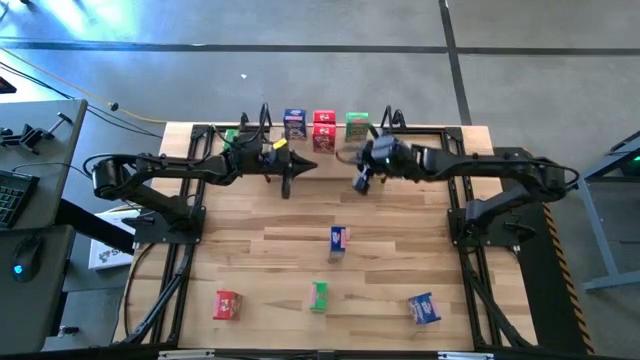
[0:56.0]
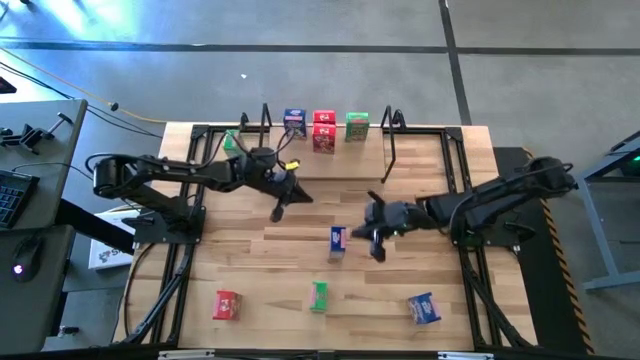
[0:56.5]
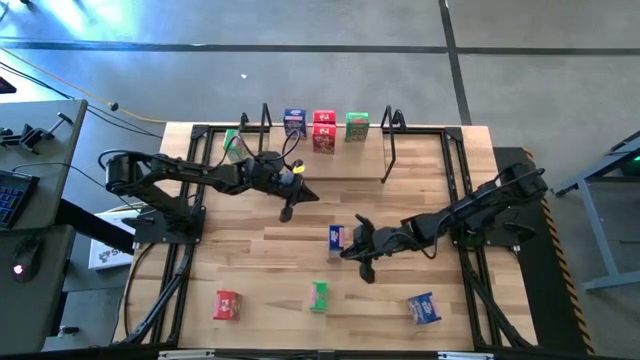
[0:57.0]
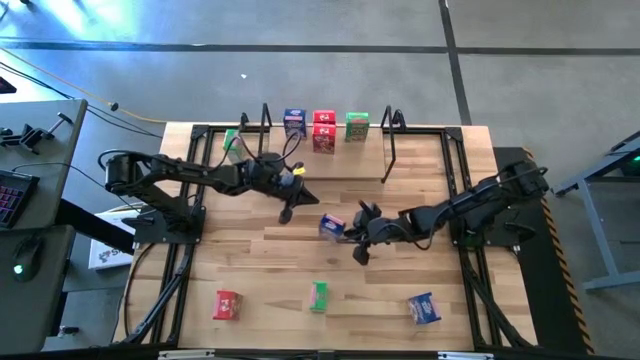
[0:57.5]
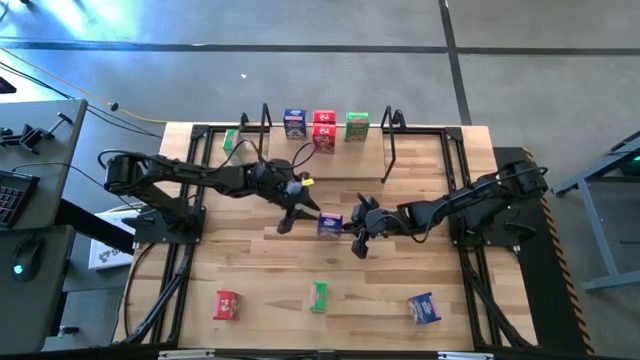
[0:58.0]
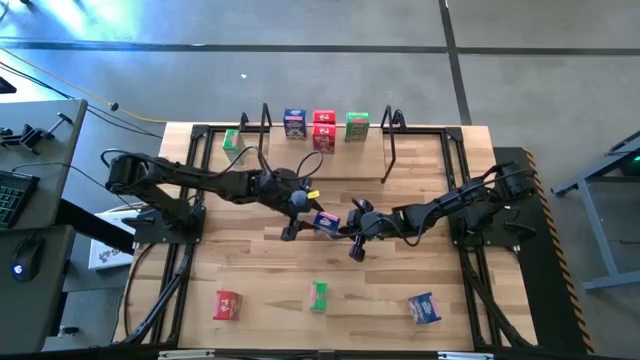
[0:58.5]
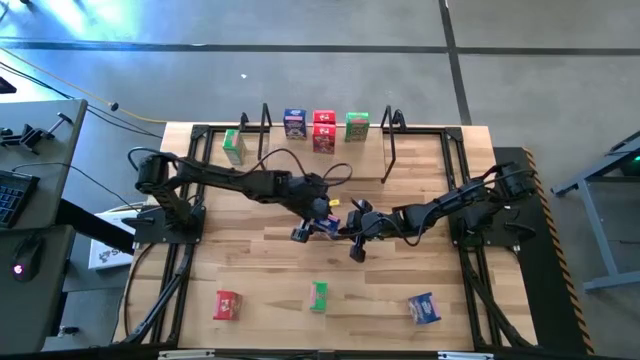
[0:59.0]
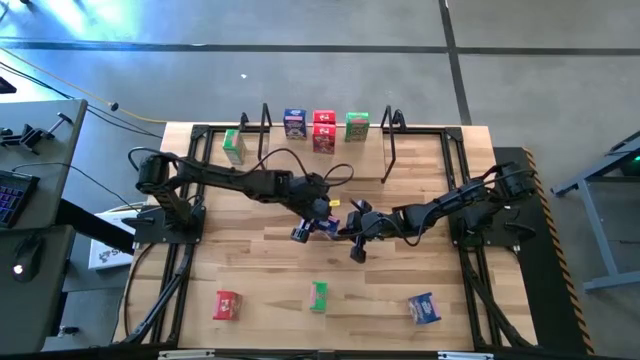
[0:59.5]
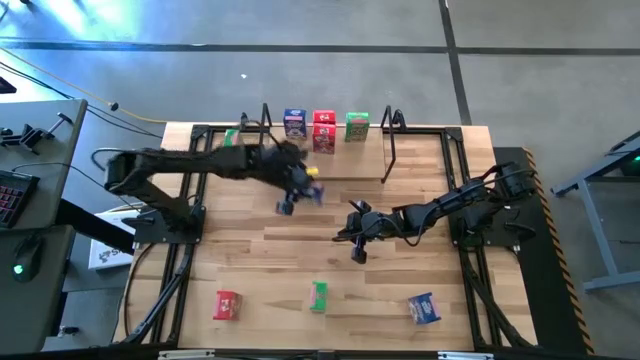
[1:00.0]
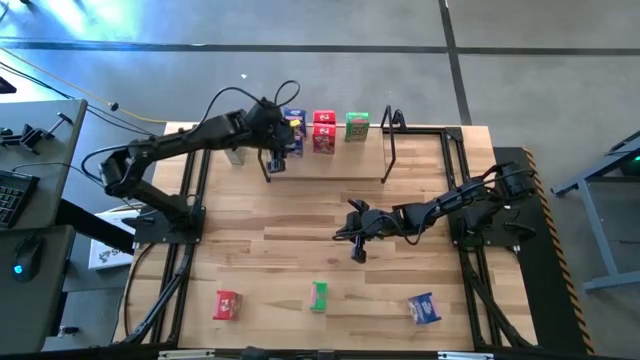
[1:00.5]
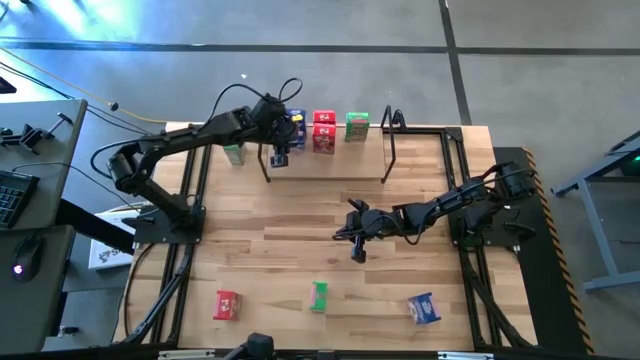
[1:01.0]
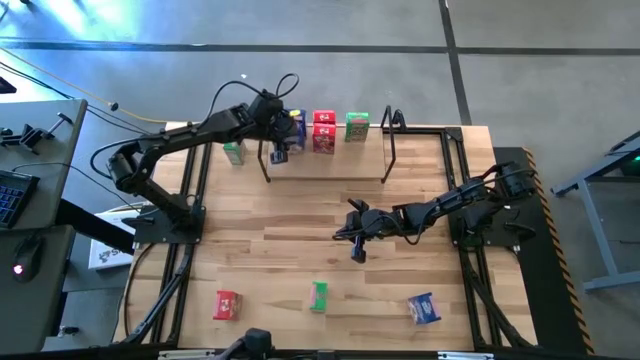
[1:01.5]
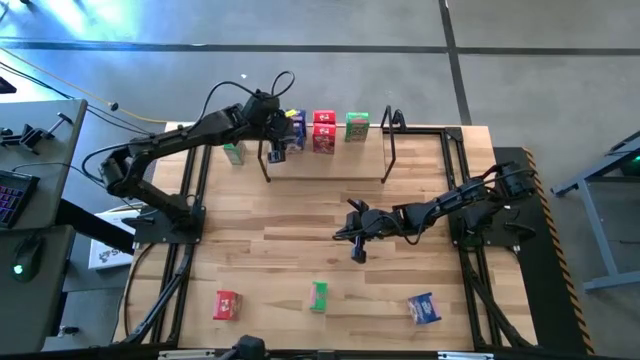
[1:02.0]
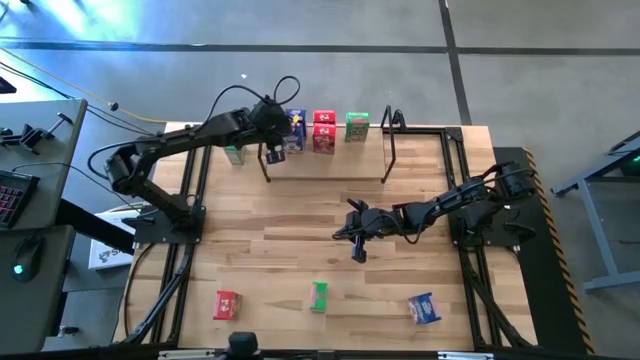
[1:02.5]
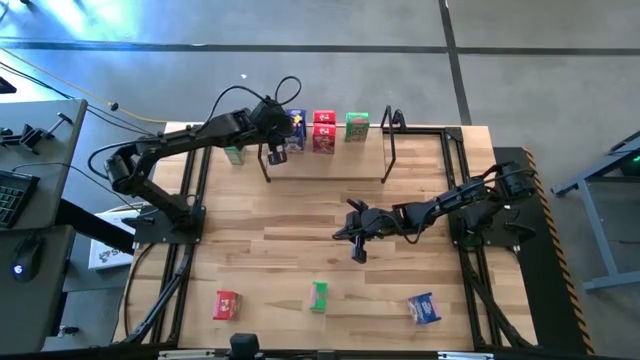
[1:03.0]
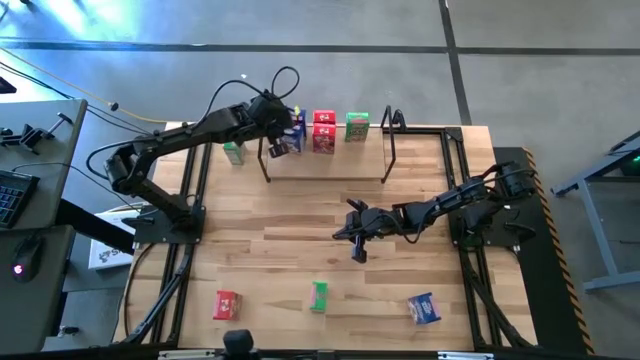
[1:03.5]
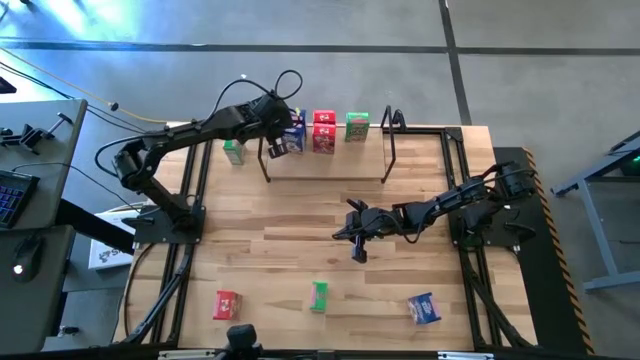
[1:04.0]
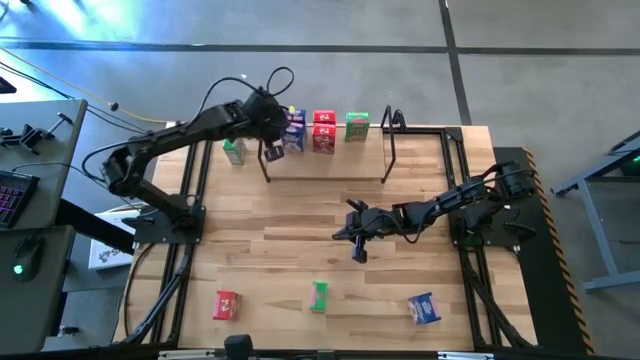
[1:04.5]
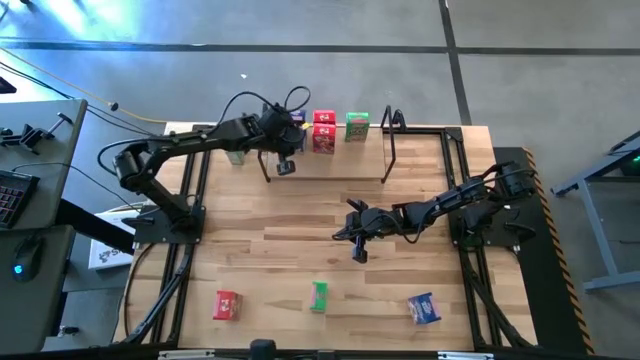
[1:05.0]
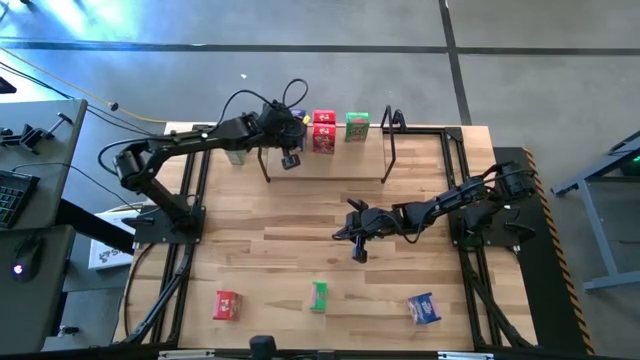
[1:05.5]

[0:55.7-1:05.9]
Task: Stack cereal on shelf
Put the top blue cereal box on the shelf aligned with the other blue cereal box

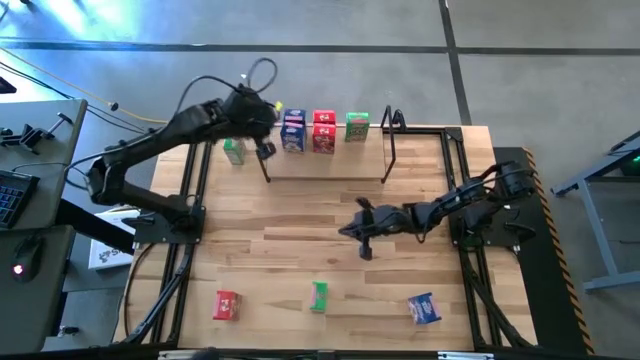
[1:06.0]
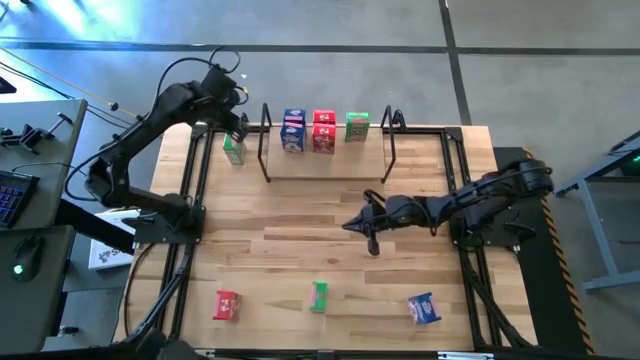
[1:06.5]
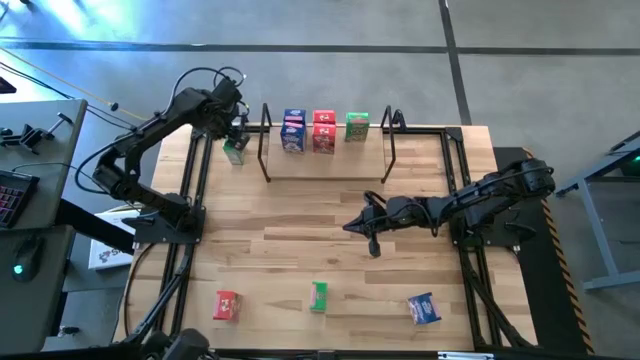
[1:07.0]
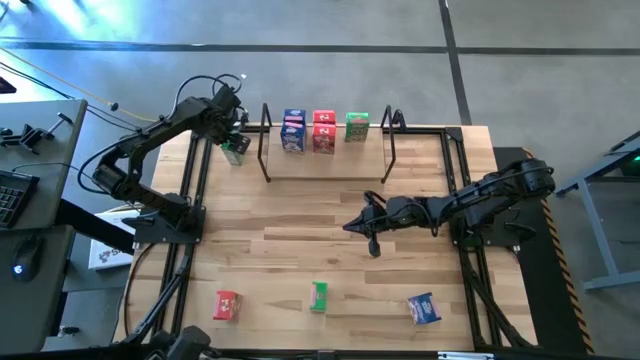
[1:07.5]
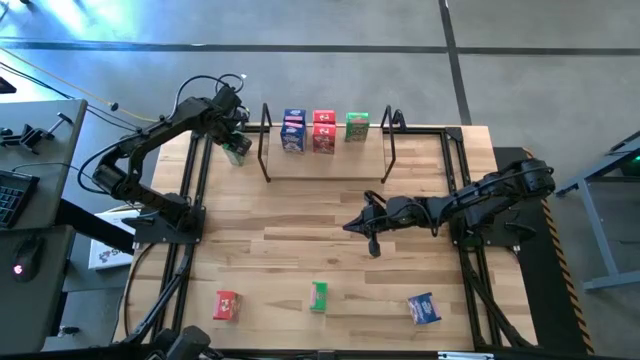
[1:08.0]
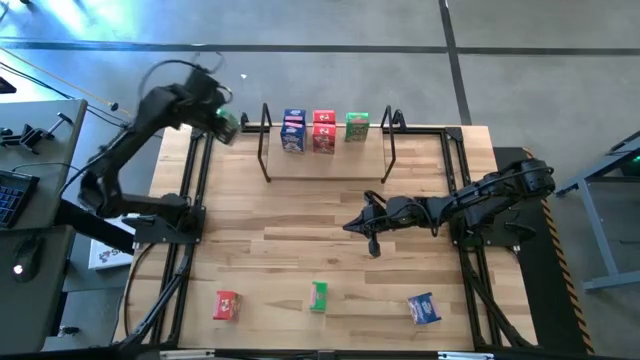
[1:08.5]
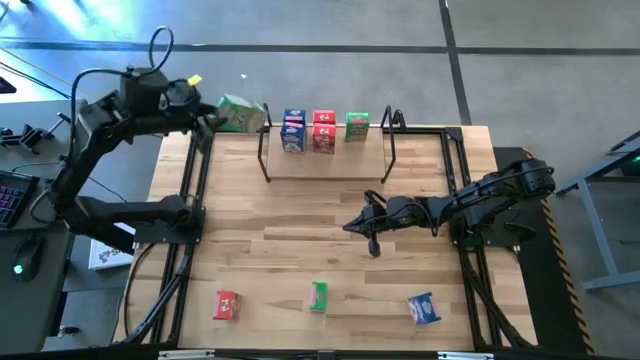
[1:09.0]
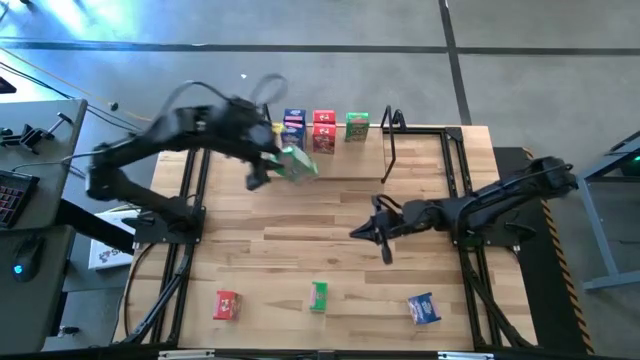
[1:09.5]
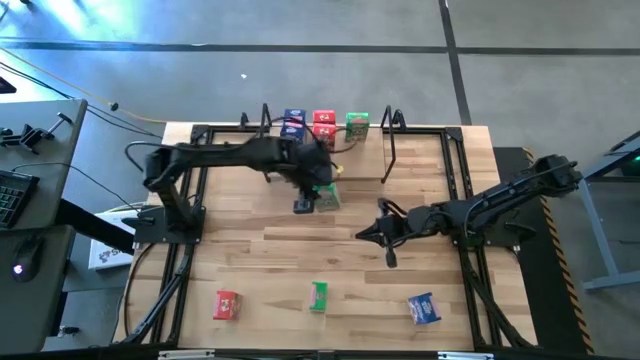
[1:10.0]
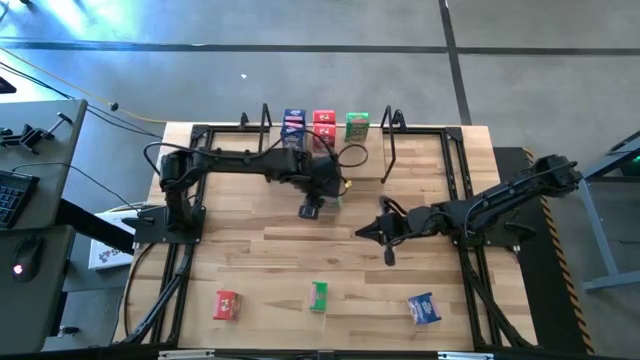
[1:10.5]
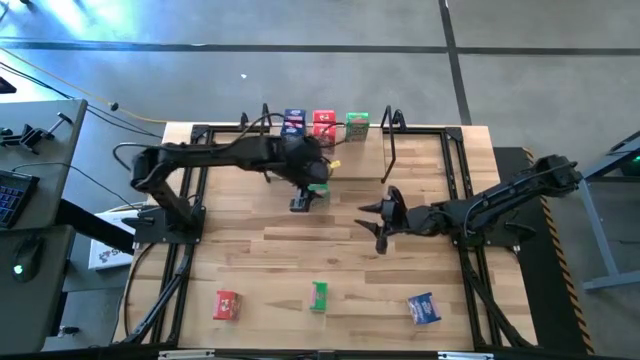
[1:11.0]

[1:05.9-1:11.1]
Move the top green cereal box to the center of the table

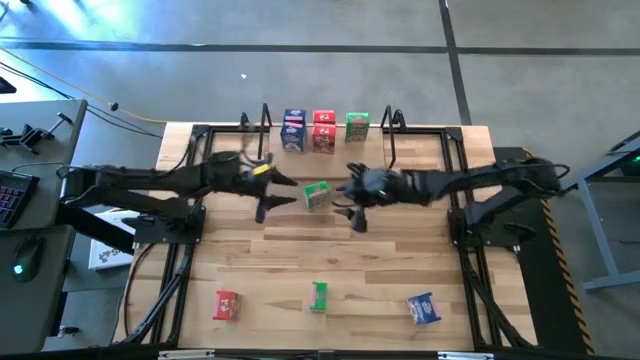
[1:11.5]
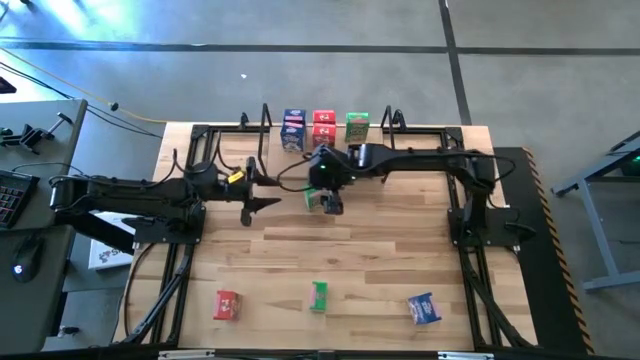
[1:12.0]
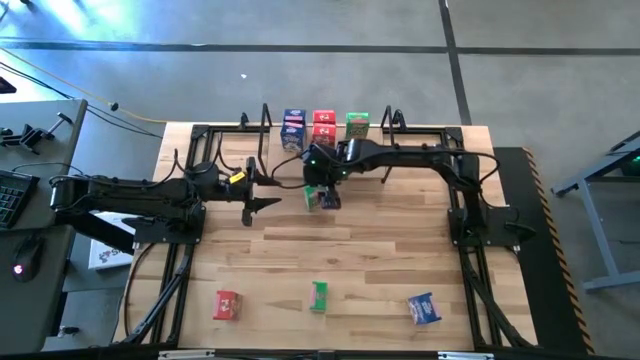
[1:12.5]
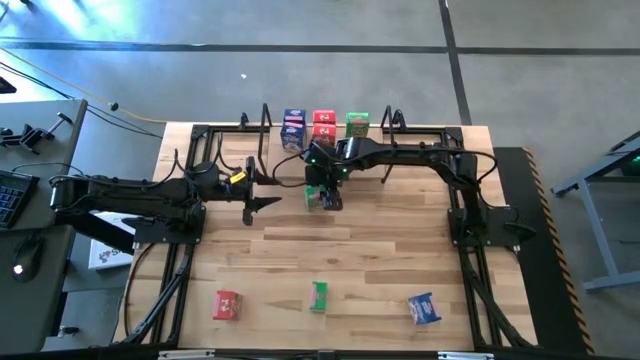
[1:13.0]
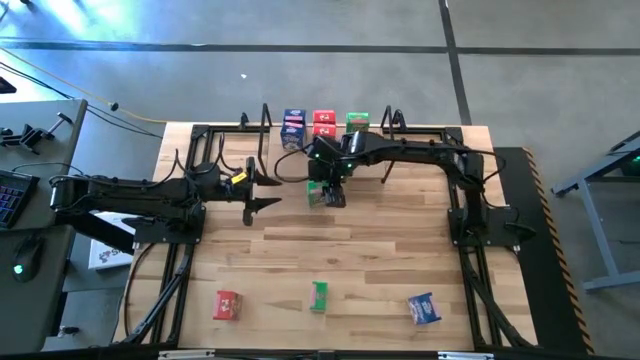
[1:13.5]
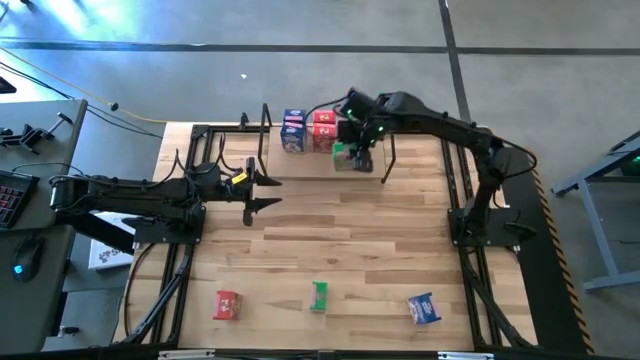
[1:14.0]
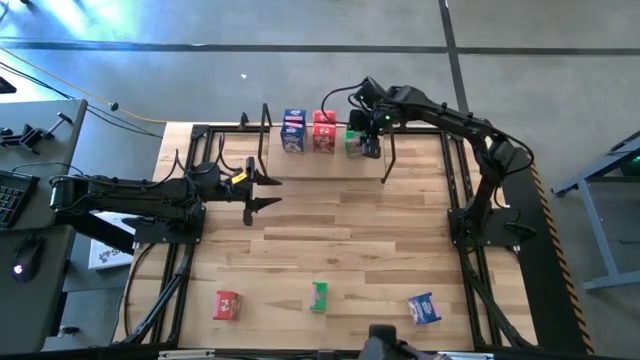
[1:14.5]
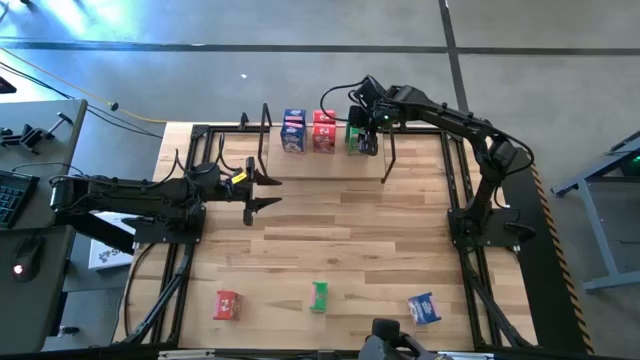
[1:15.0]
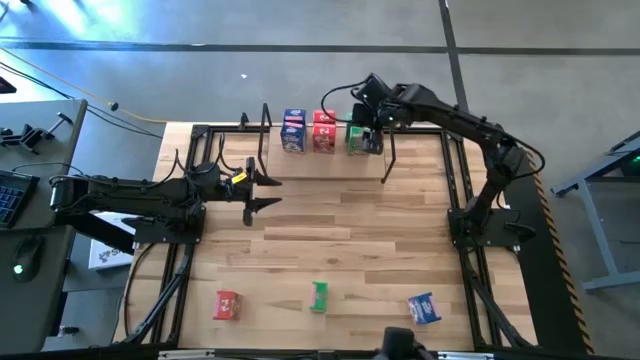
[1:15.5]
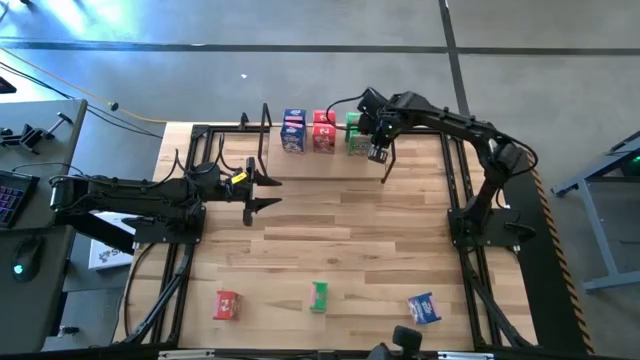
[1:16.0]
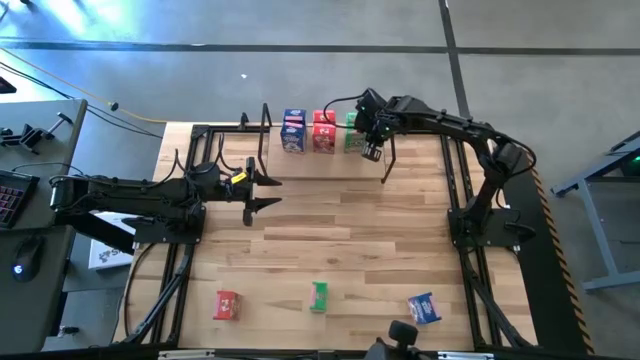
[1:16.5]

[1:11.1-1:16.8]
Put the center green cereal box on the shelf aligned with the other green cereal box
